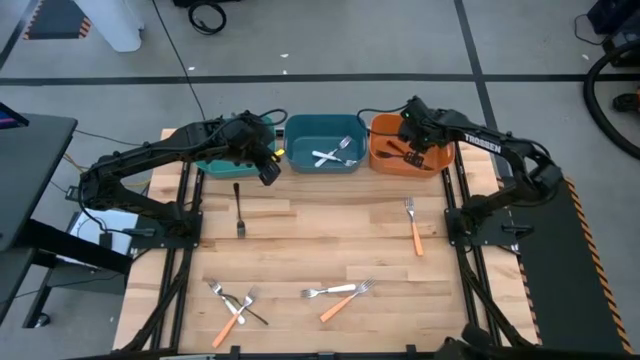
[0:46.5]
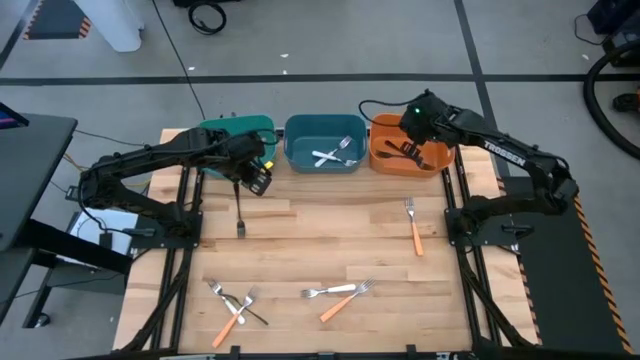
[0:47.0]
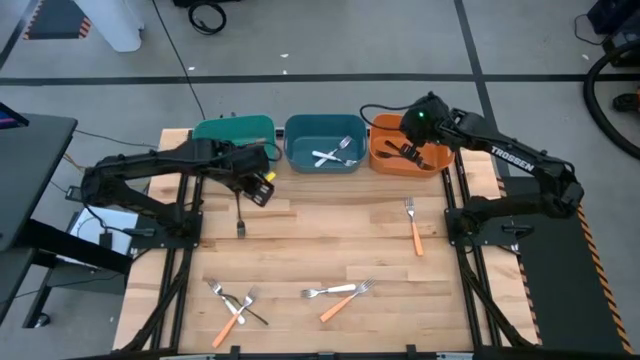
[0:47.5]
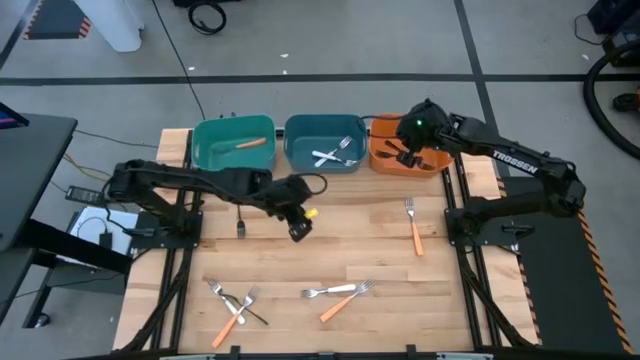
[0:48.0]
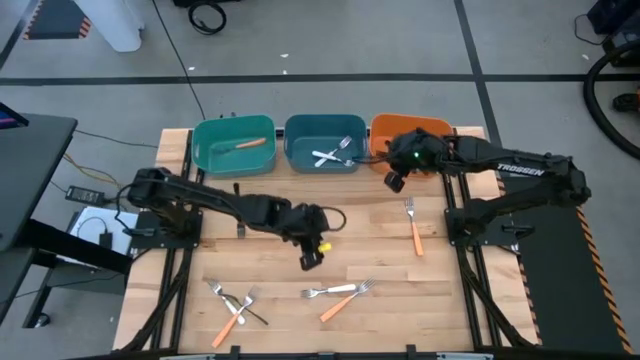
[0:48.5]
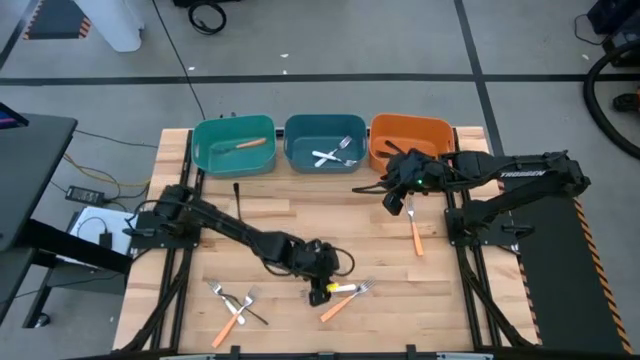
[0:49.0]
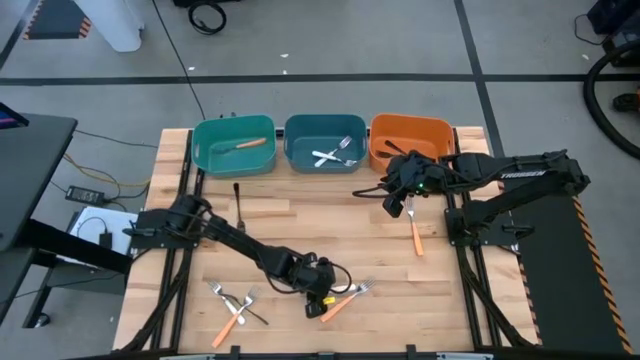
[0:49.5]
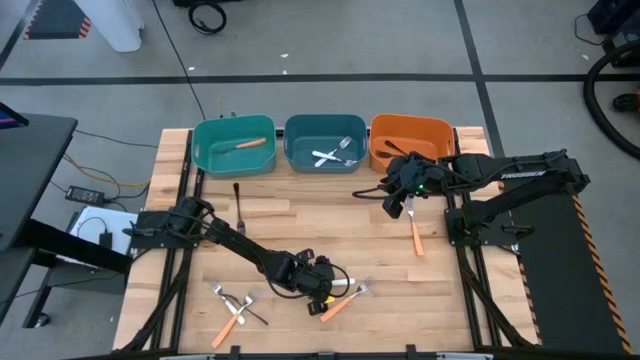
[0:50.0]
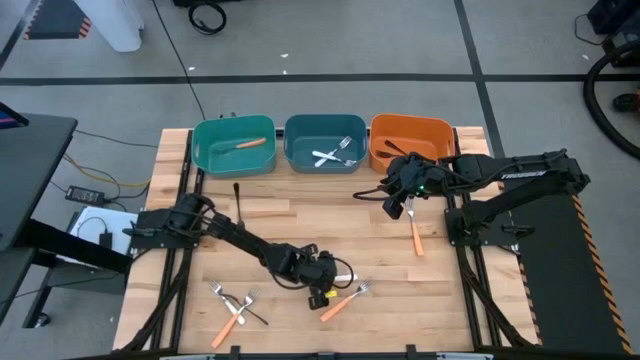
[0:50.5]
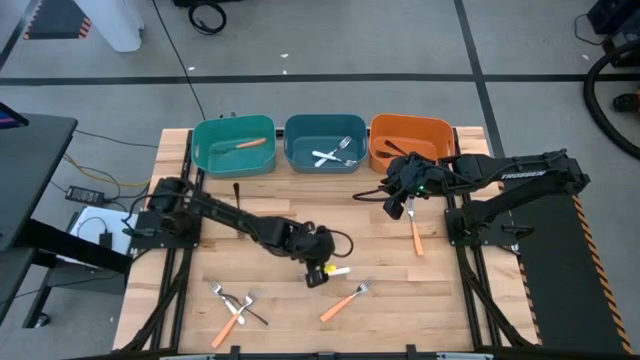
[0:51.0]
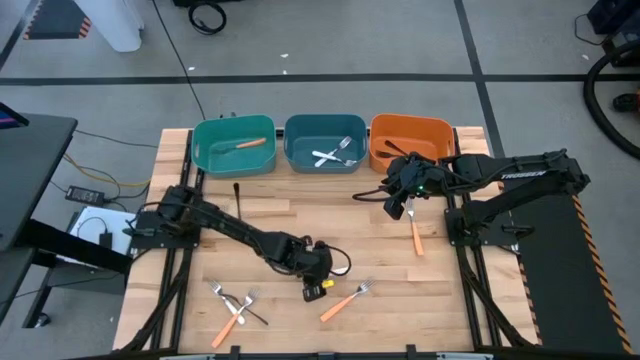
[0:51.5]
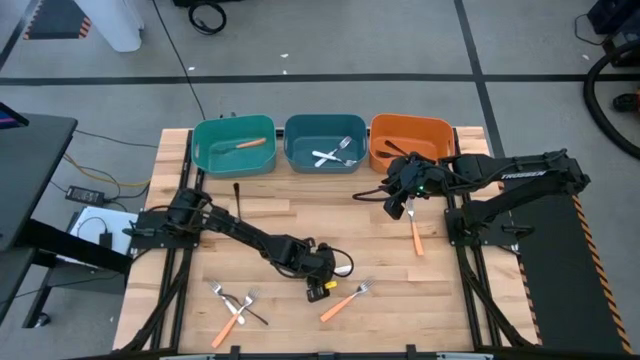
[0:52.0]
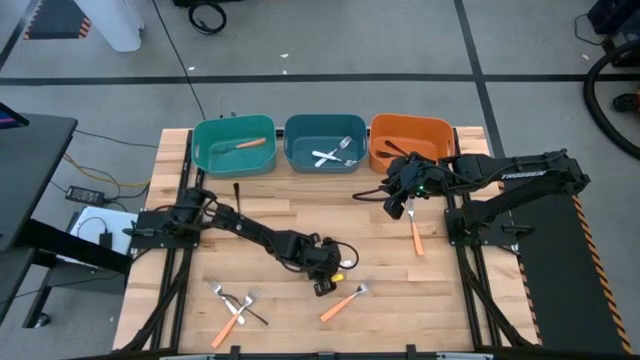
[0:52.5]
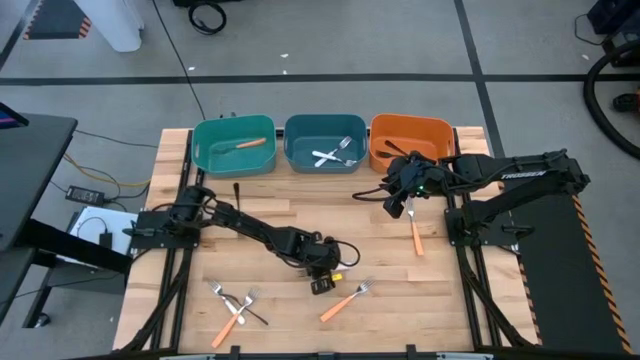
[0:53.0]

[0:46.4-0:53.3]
Task: Sort silverware by color (type)
Put the white fork into the dark blue bin

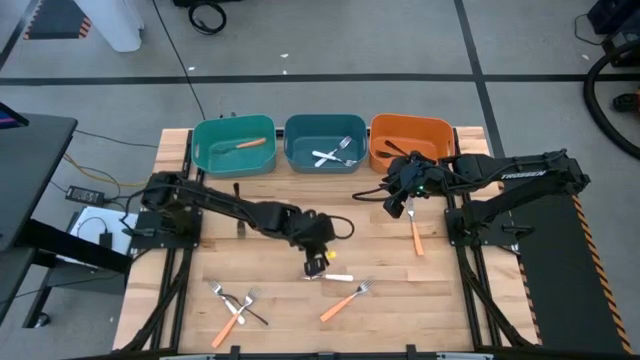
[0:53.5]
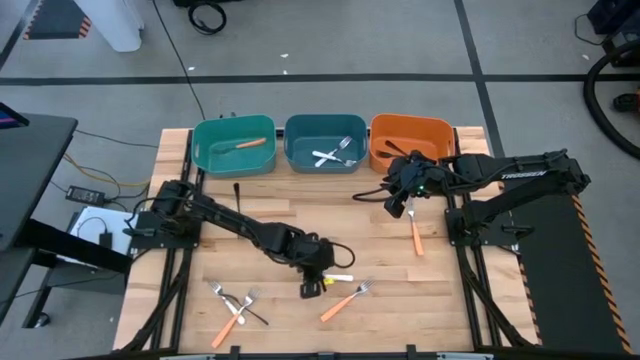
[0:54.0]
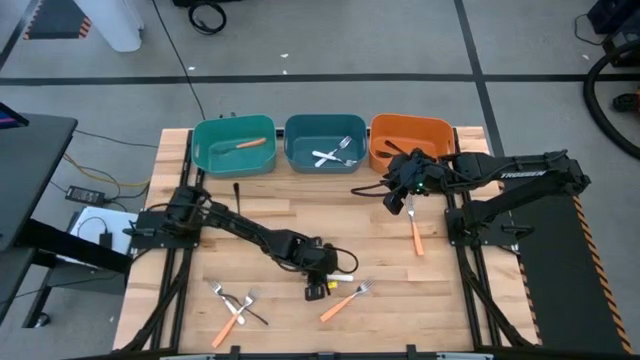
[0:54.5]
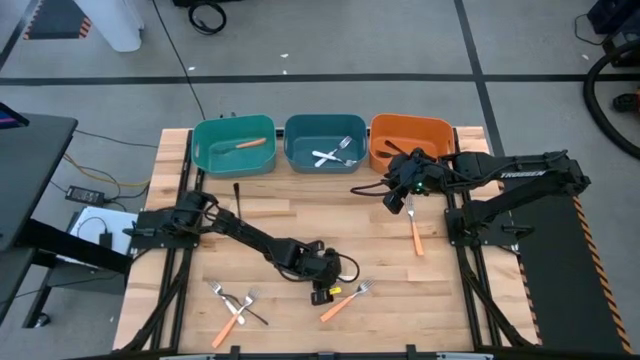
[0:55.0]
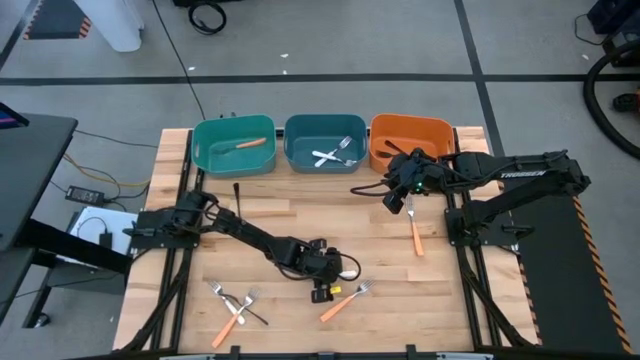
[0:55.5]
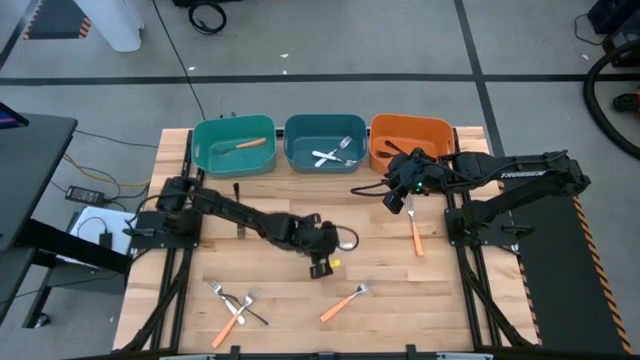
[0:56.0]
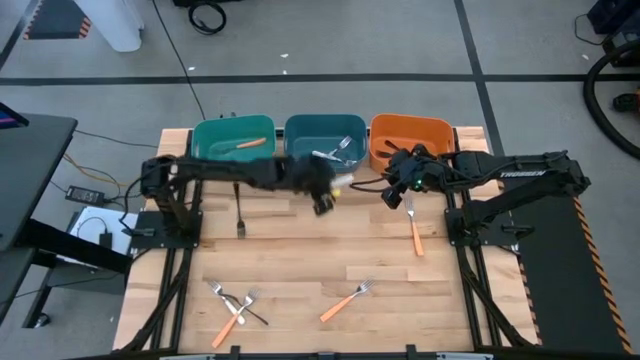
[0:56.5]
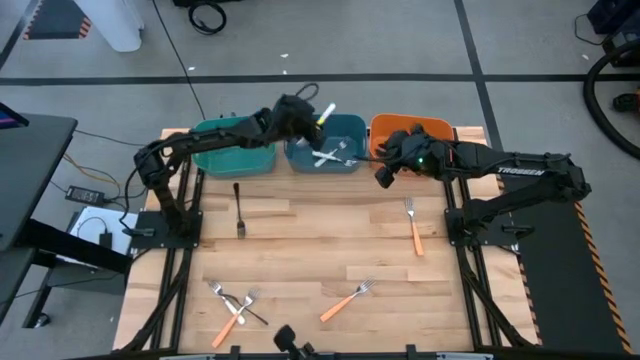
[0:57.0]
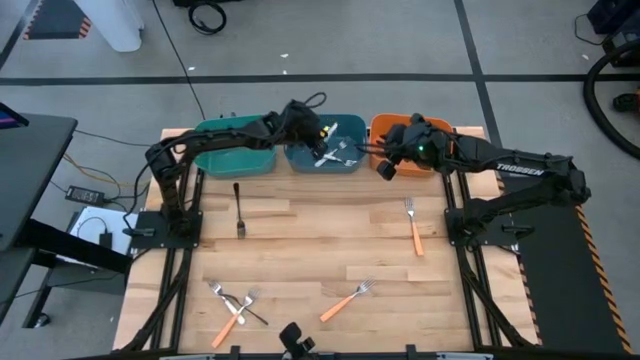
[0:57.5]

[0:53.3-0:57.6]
Put the white fork into the dark blue bin

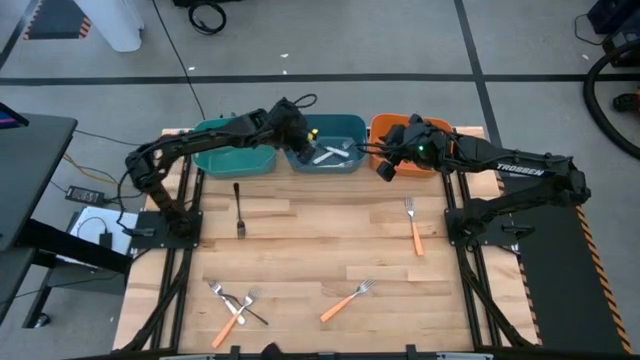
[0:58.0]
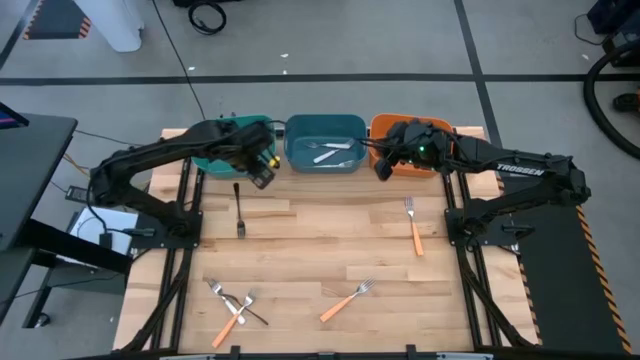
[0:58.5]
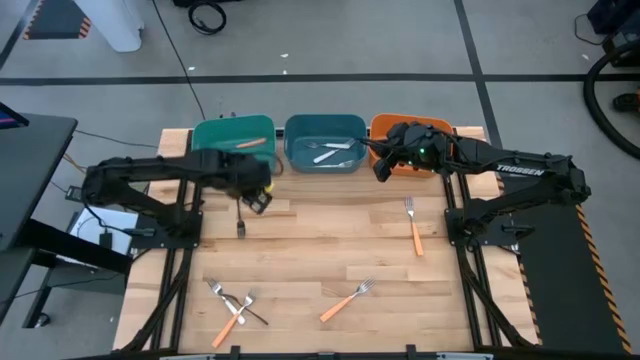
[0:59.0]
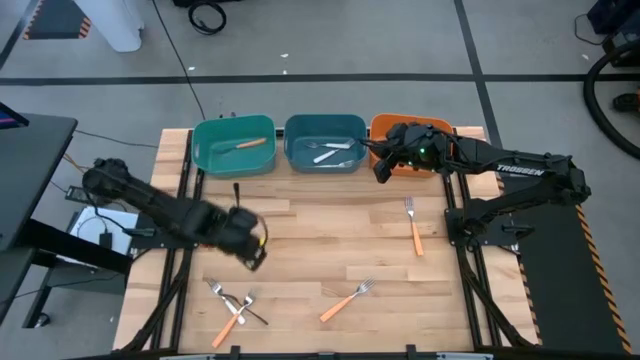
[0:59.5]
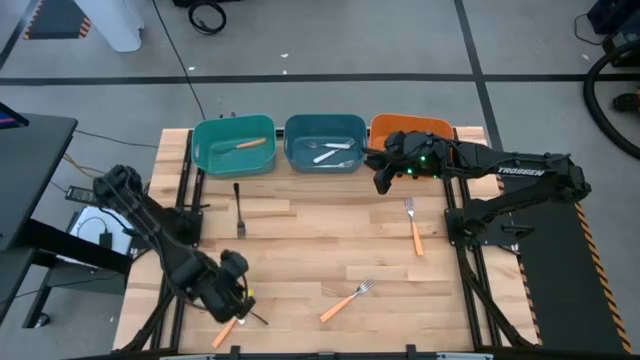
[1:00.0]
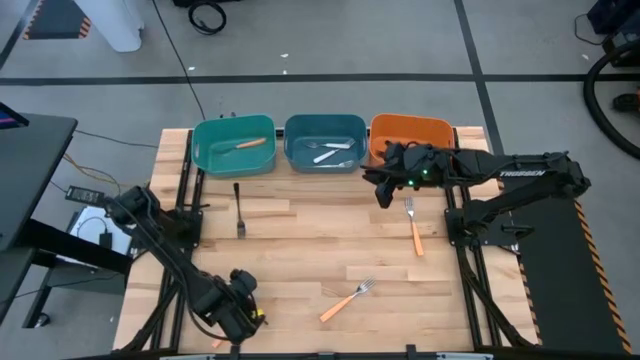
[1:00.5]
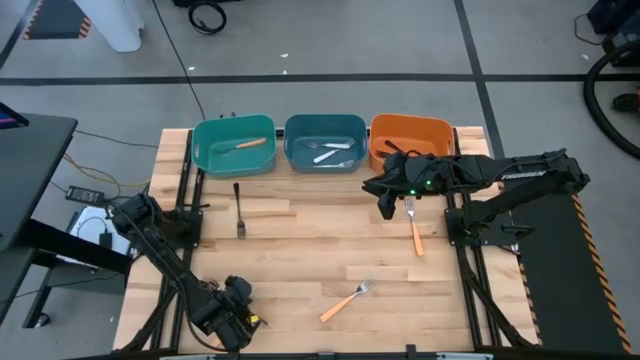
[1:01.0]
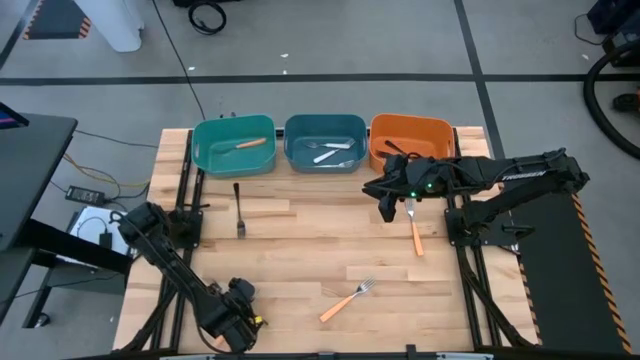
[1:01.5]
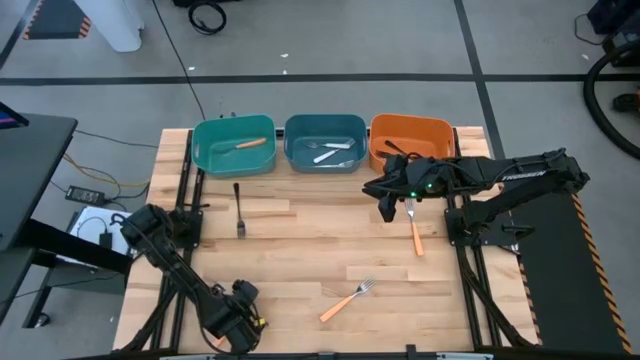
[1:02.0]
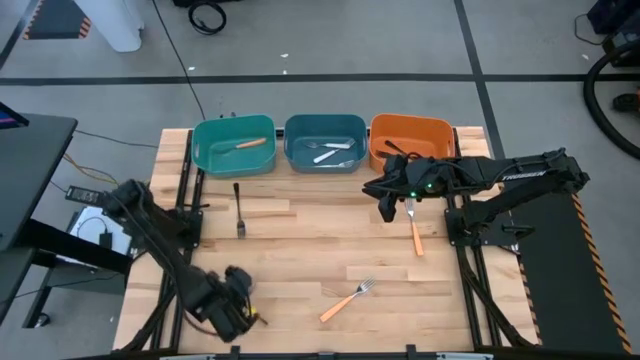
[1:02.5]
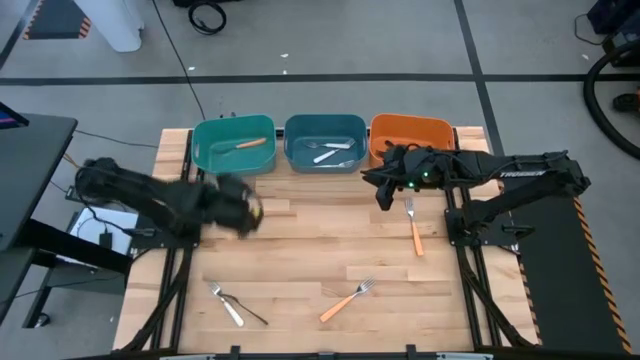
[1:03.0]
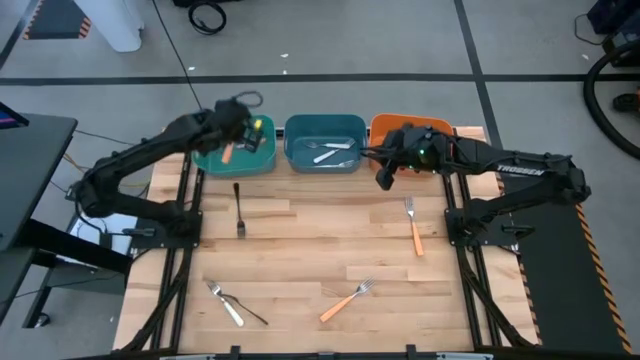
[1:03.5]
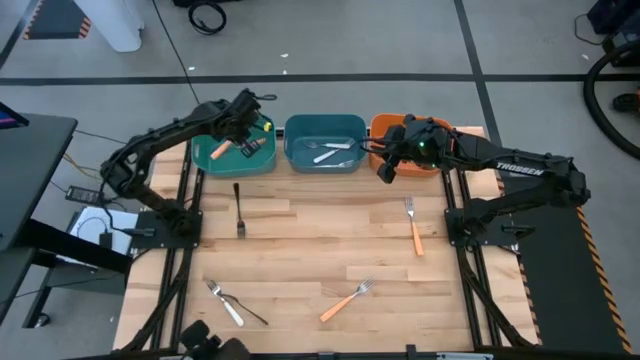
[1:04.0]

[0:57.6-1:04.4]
Put the orange fork into the green bin

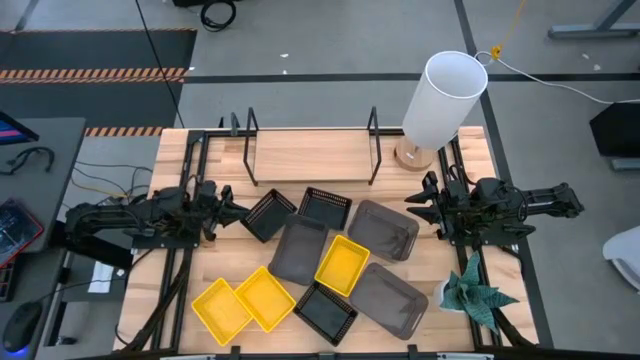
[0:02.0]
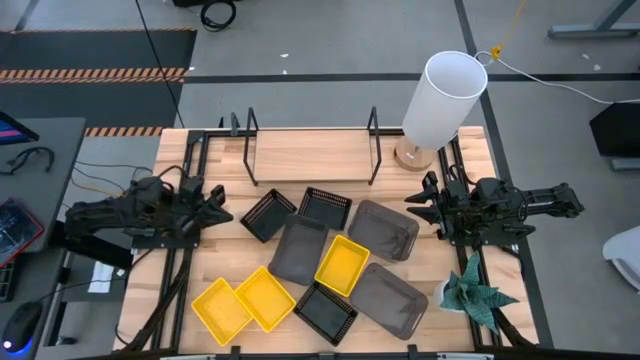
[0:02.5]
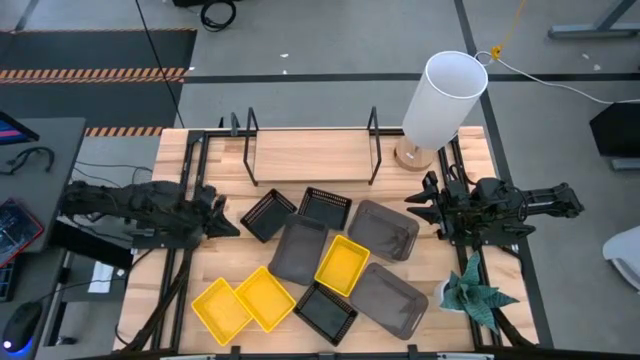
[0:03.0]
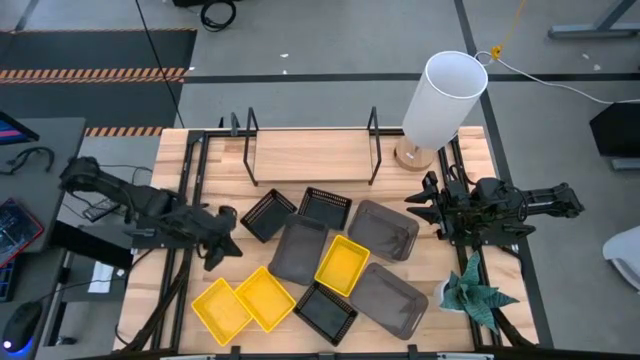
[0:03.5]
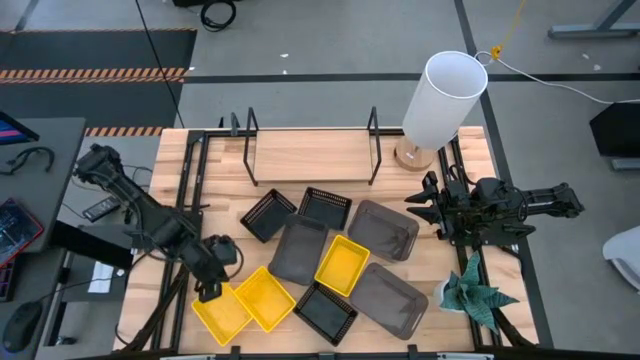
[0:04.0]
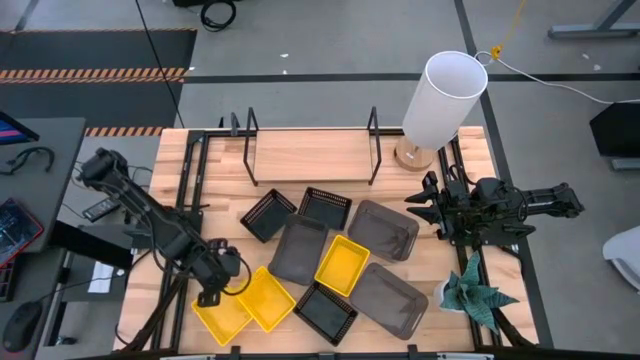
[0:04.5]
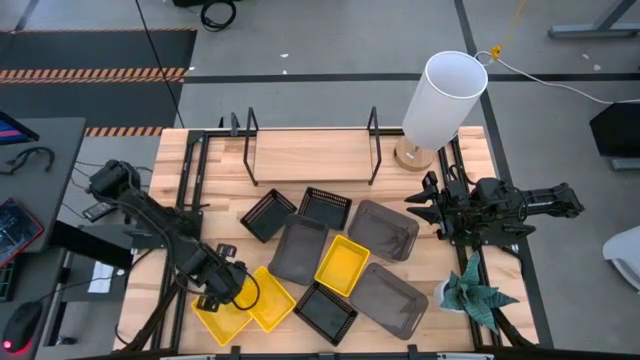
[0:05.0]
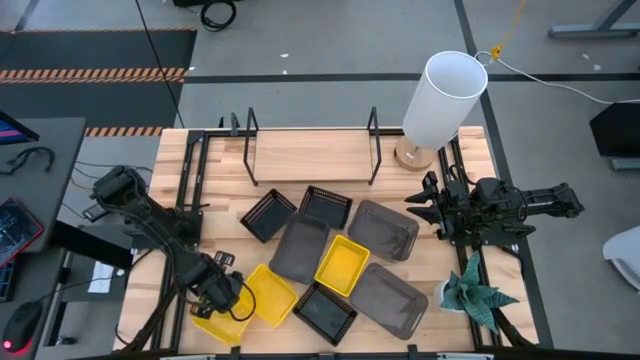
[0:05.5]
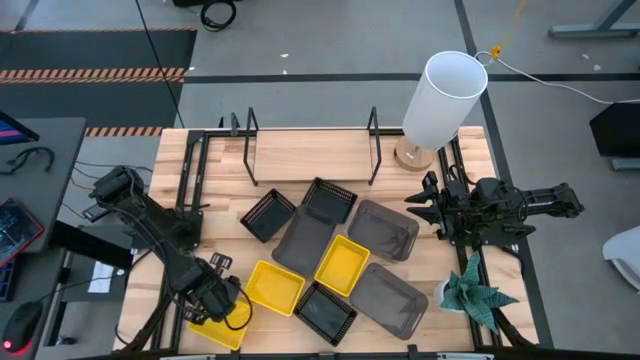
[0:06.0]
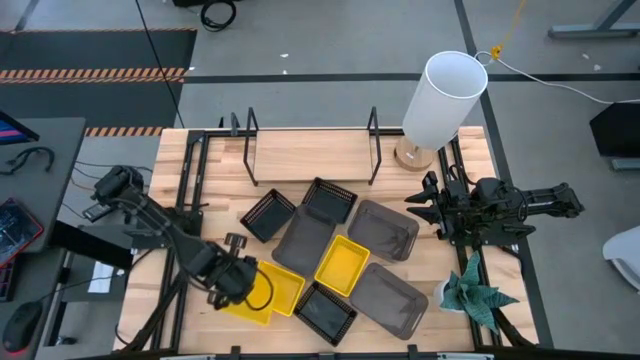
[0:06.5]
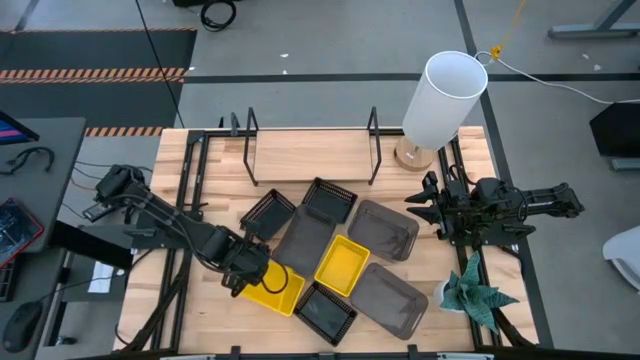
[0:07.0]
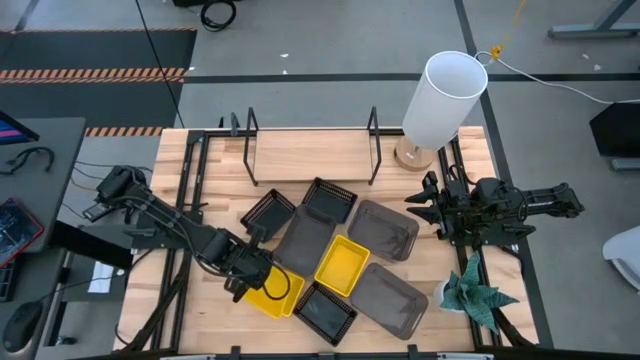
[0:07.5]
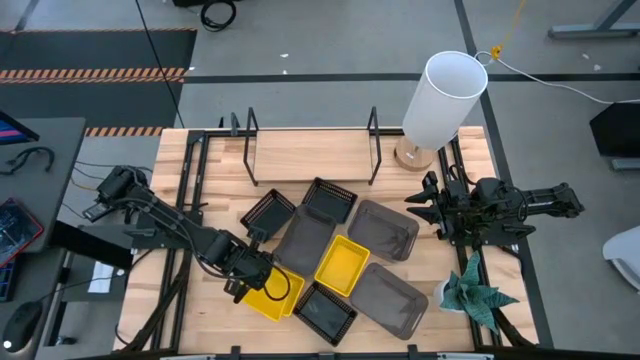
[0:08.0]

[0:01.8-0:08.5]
Task: Stack baskets on shelf by color
Stack the left yellow bin on top of the middle yellow bin
